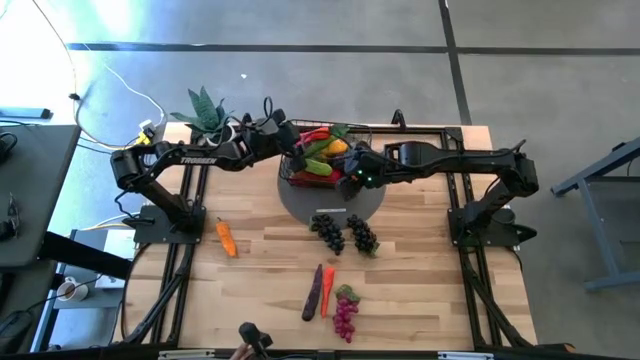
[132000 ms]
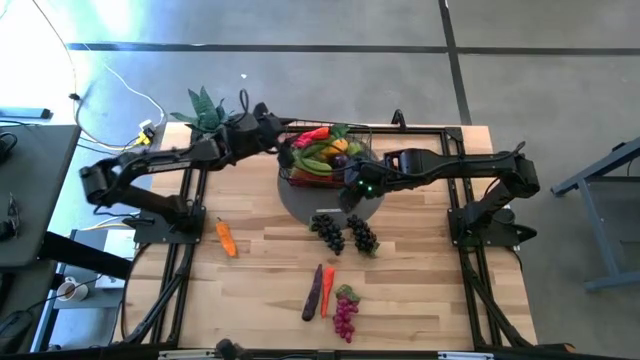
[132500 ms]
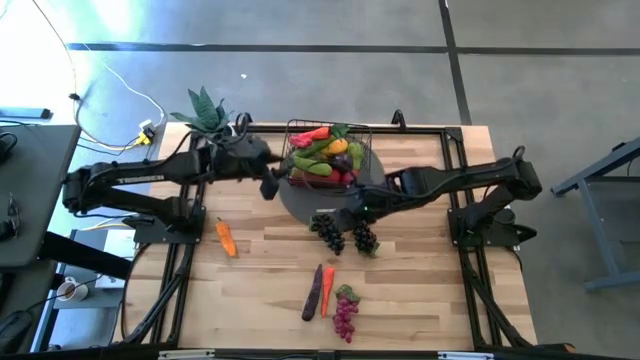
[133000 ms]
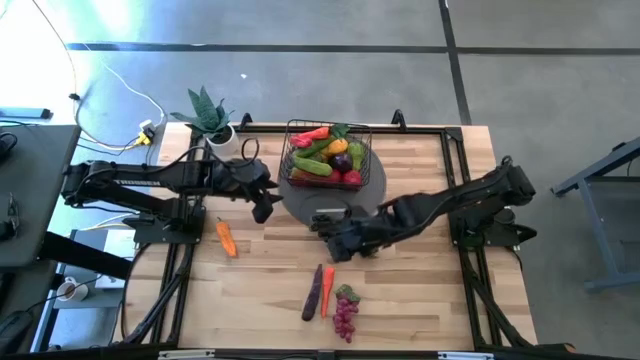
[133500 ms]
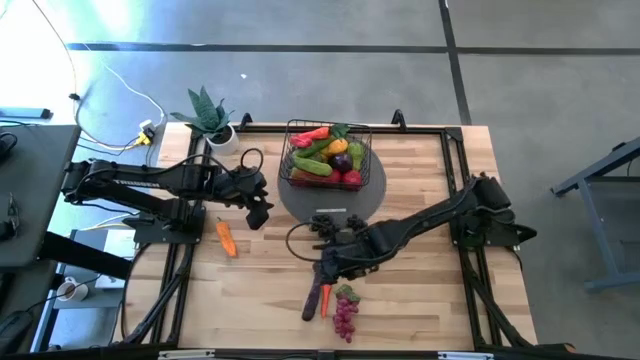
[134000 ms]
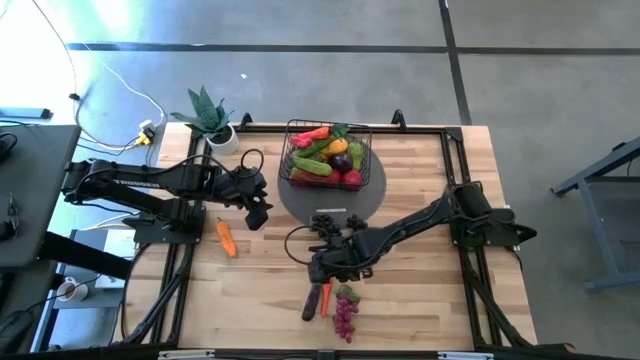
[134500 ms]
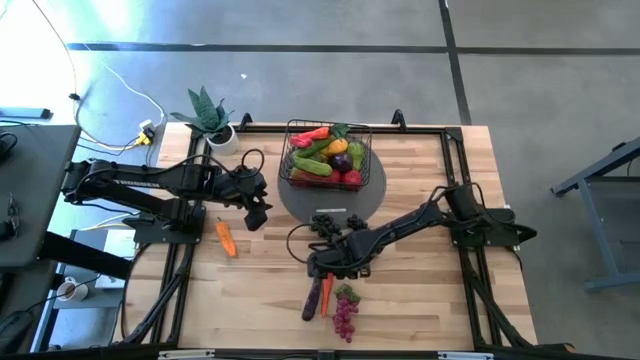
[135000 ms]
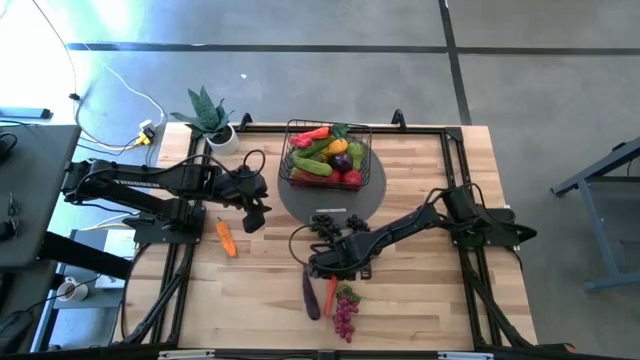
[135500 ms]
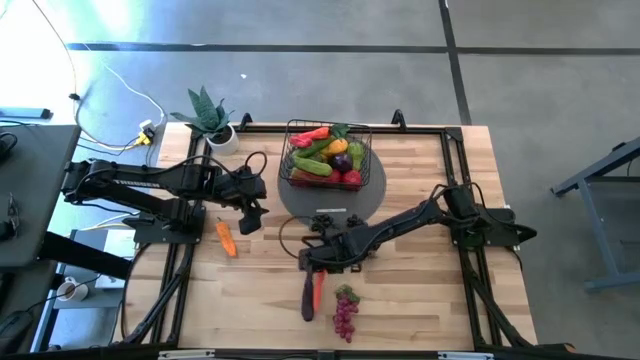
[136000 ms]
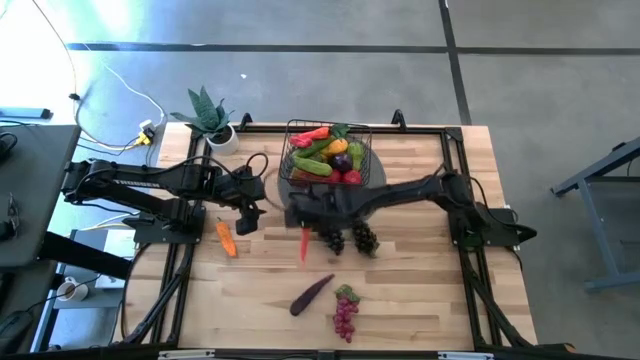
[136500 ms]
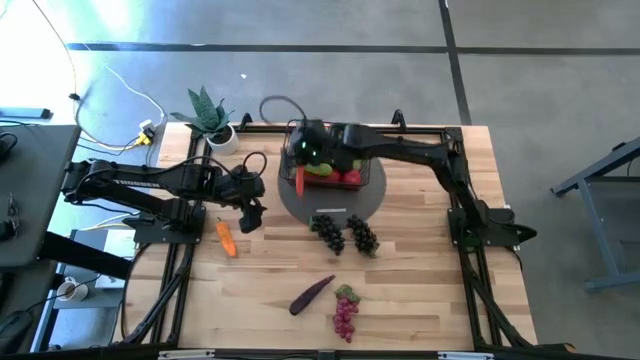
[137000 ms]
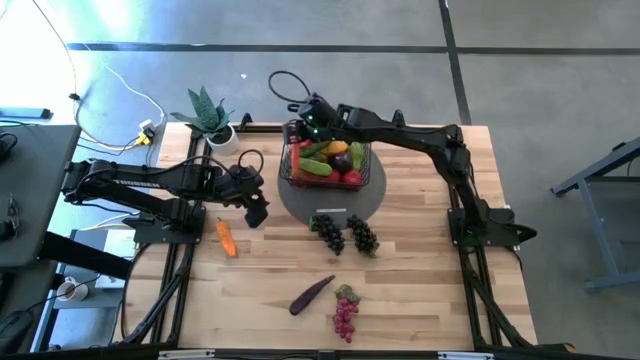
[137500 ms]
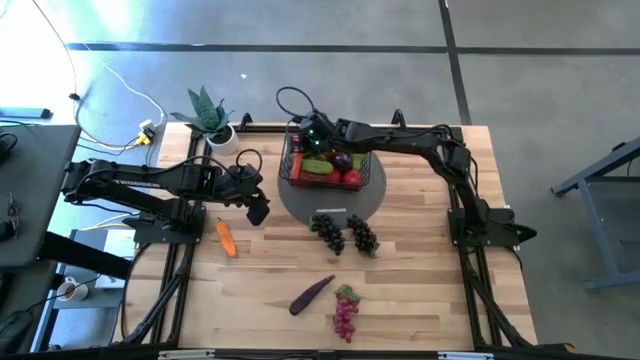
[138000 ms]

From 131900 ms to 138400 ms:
Task: Build produce basket
Put the orange carrot into the wire basket

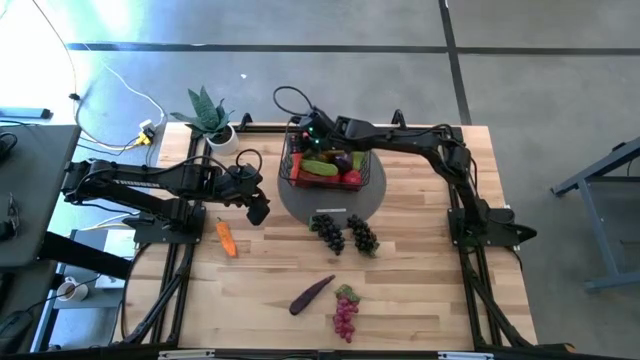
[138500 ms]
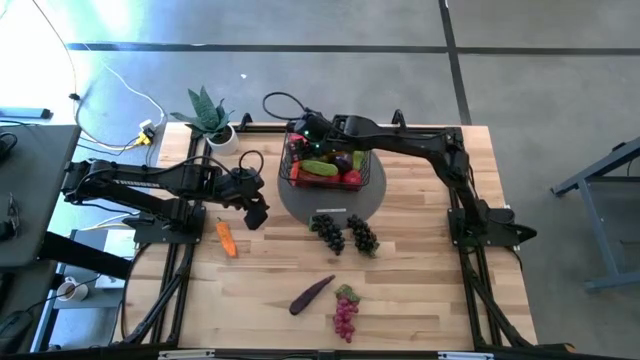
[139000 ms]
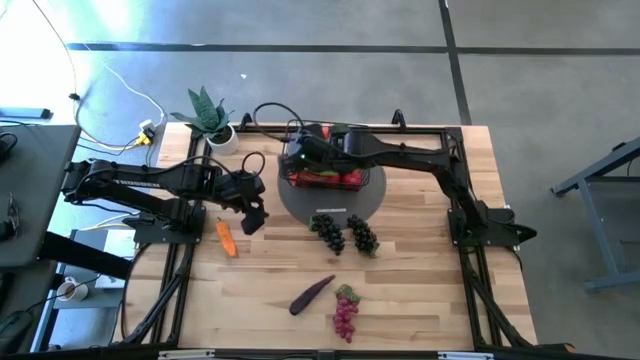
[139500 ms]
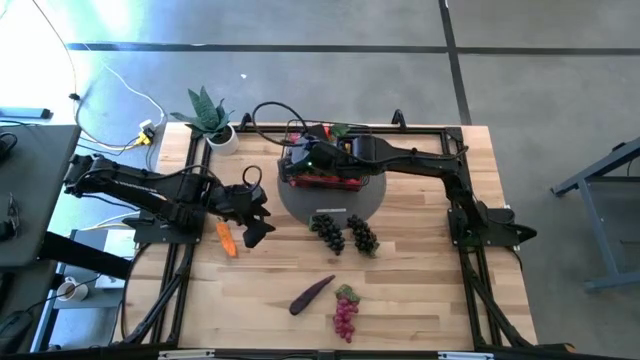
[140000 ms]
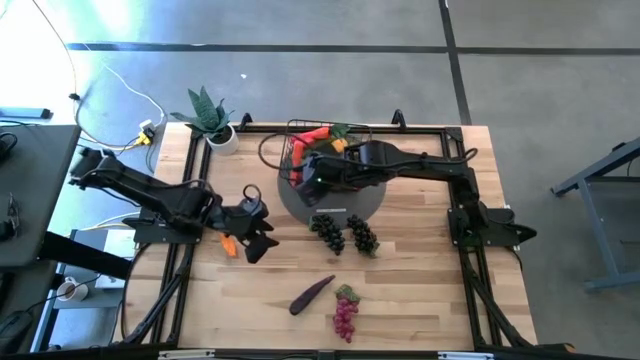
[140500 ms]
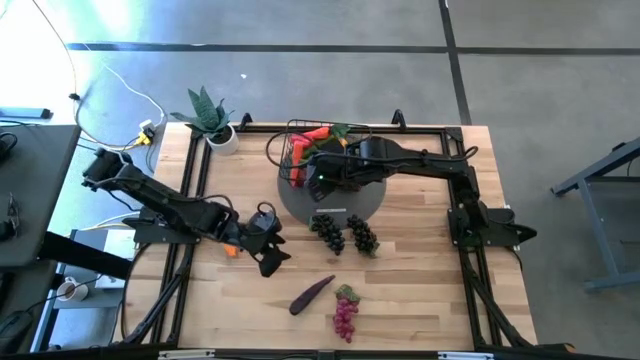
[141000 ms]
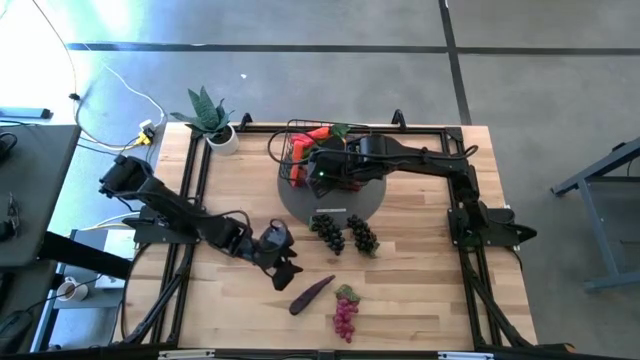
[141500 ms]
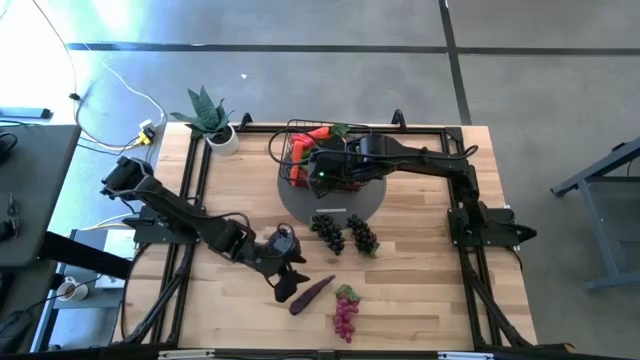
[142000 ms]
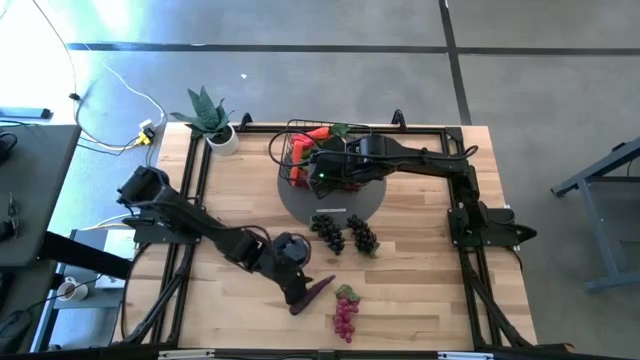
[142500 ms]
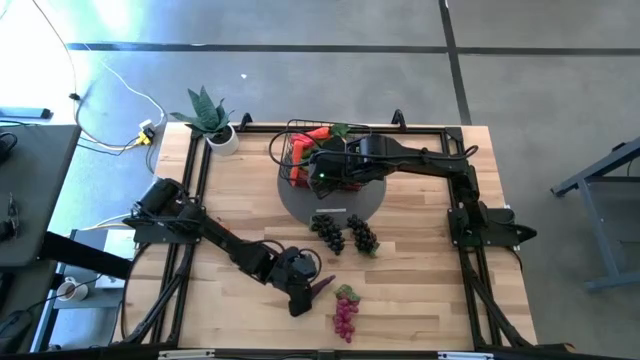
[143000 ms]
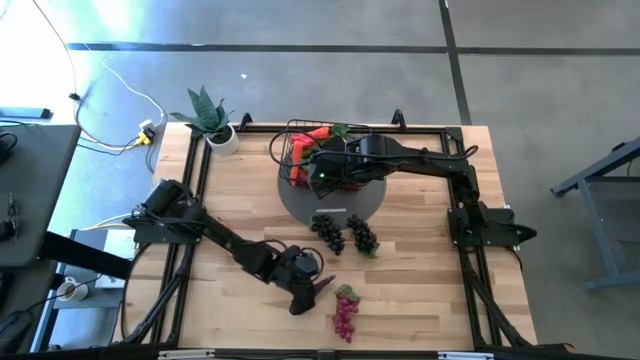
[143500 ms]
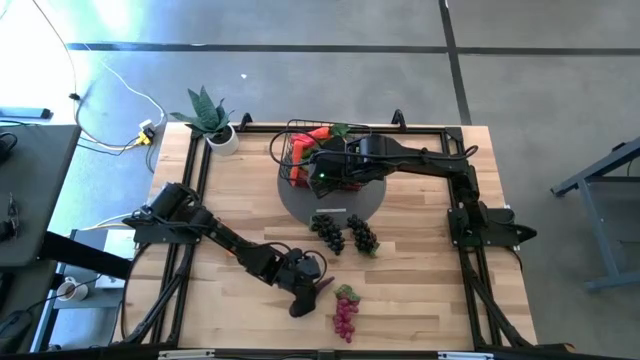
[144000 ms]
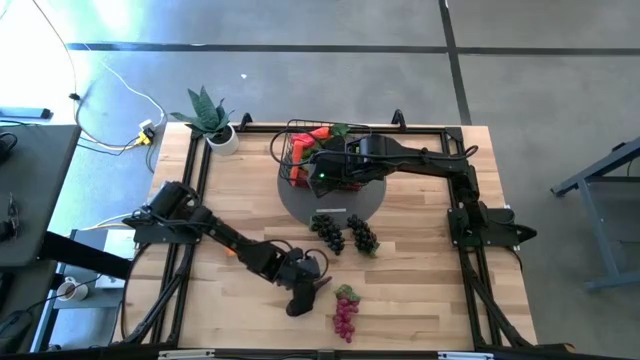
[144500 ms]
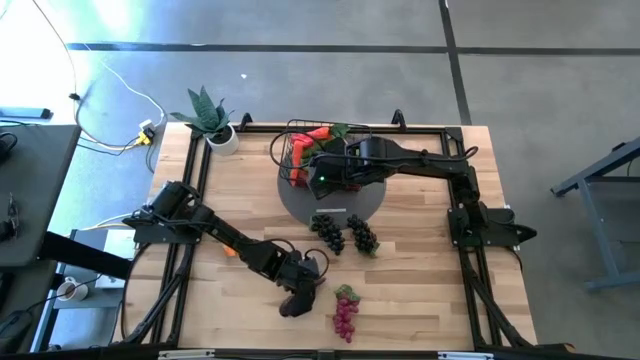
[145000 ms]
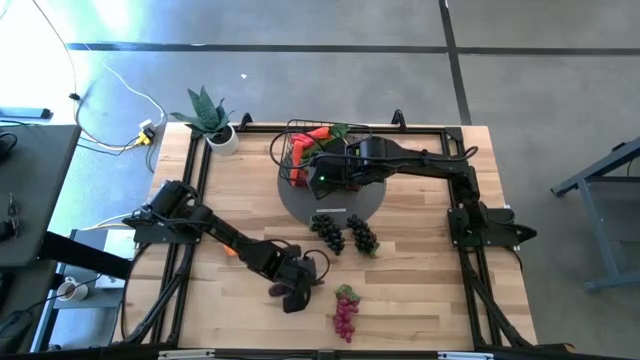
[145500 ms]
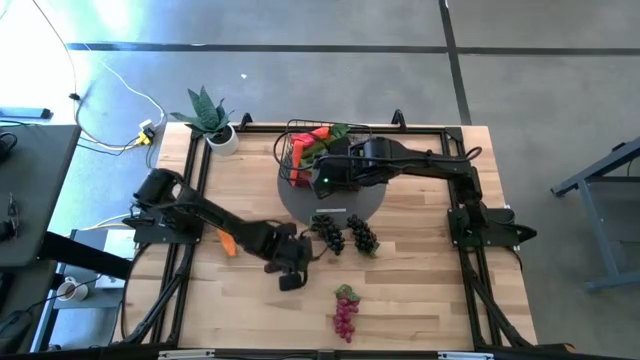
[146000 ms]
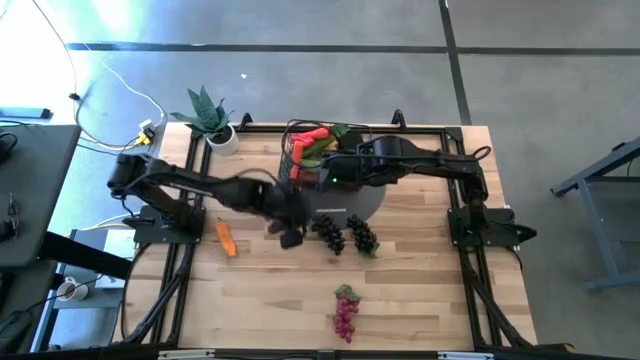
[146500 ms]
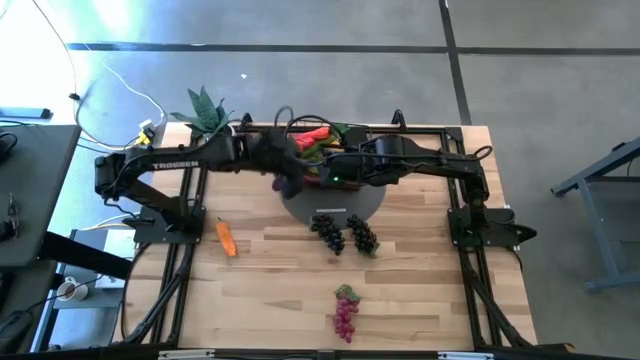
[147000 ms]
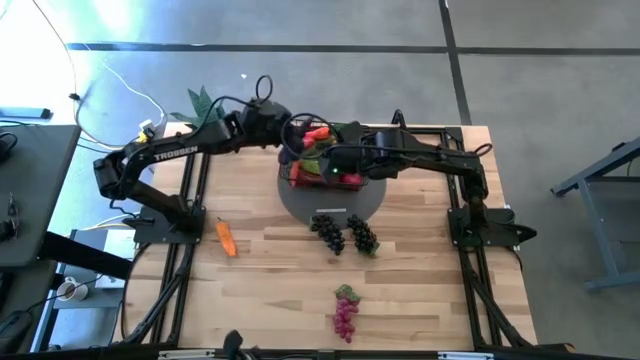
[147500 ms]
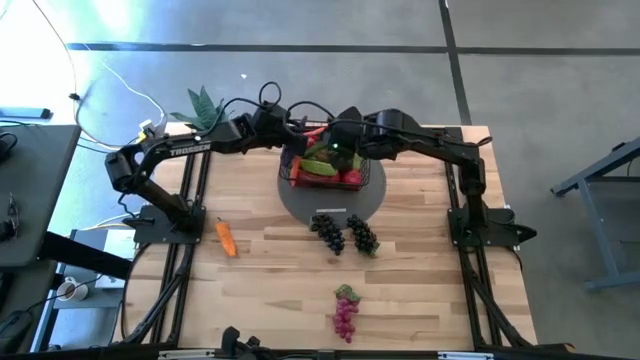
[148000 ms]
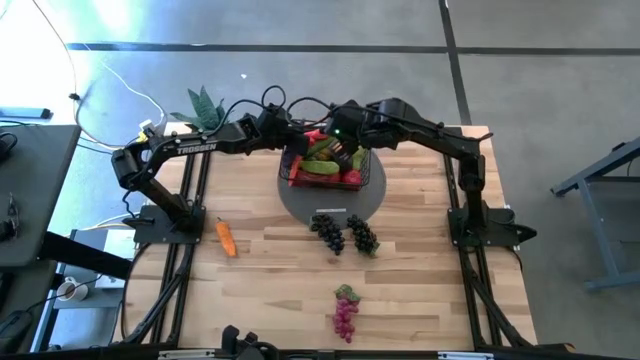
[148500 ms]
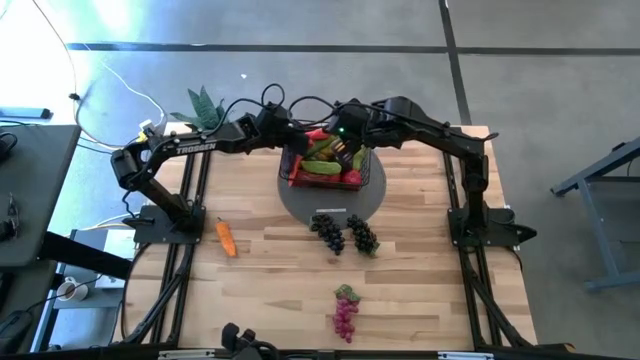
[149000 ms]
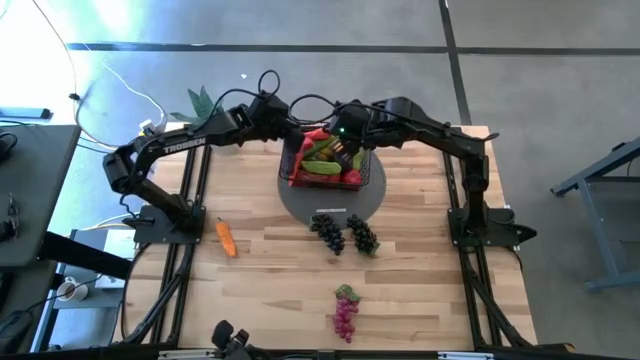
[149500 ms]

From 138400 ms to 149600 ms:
Put the purple eggplant into the wire basket
